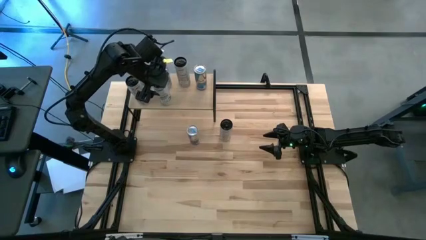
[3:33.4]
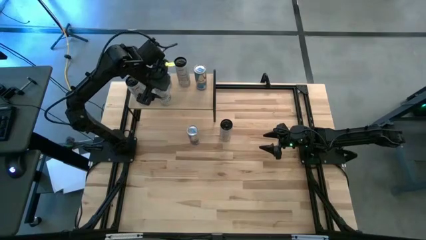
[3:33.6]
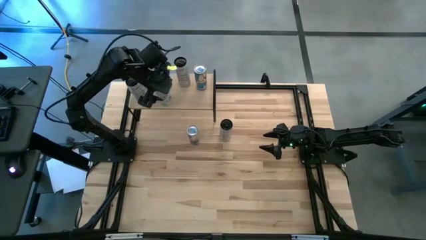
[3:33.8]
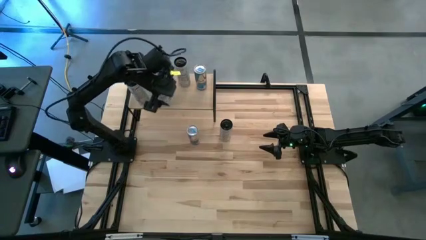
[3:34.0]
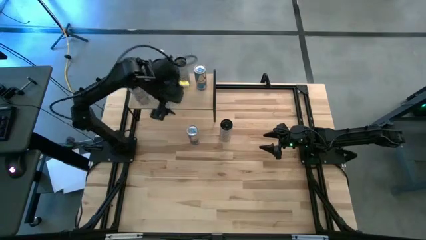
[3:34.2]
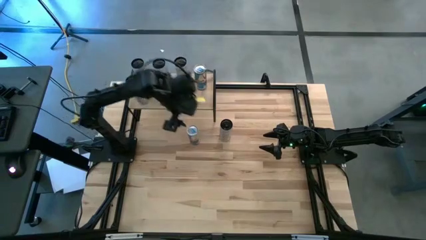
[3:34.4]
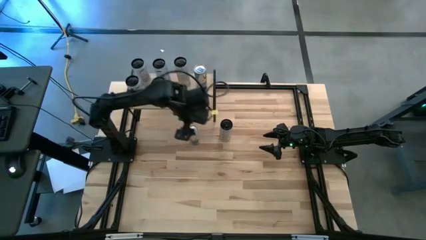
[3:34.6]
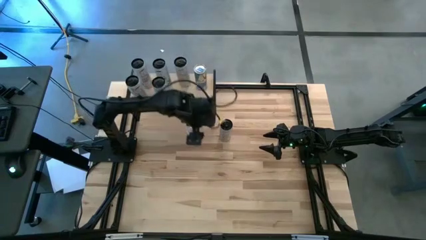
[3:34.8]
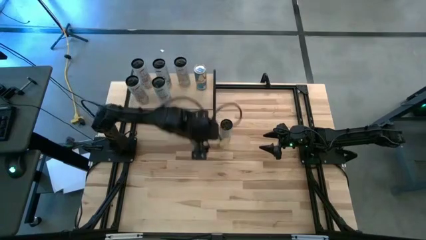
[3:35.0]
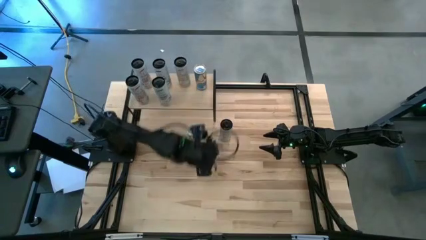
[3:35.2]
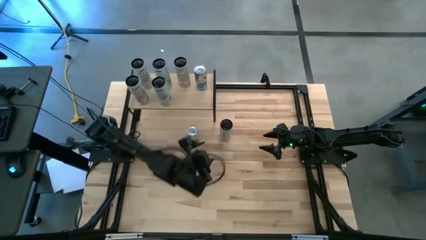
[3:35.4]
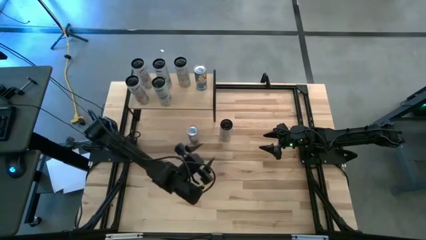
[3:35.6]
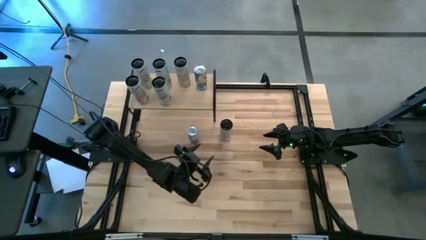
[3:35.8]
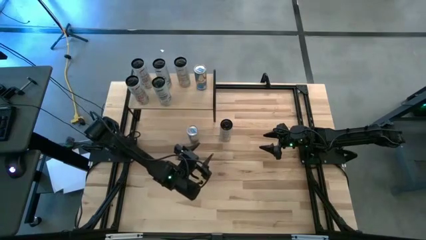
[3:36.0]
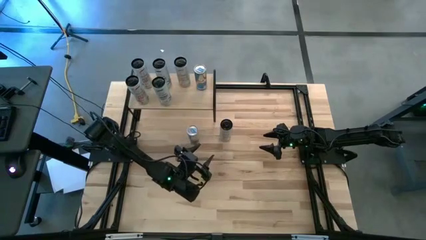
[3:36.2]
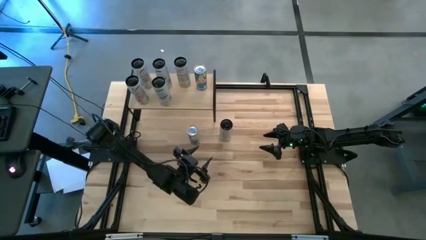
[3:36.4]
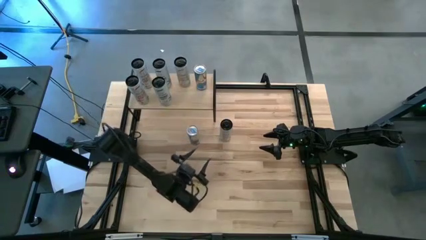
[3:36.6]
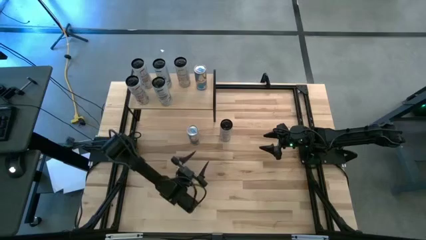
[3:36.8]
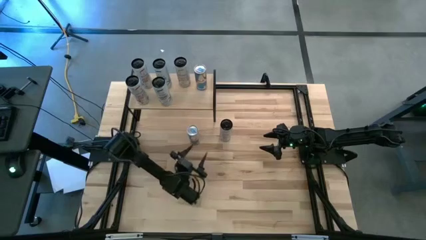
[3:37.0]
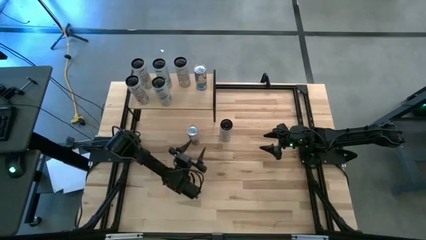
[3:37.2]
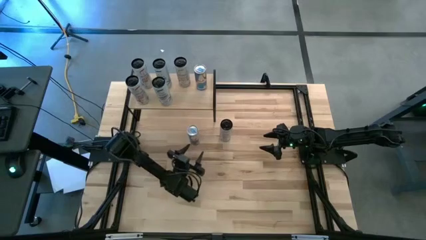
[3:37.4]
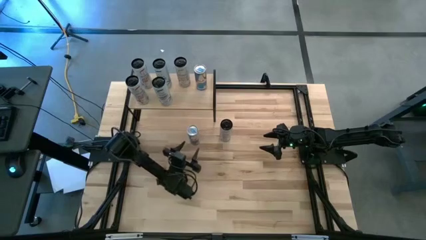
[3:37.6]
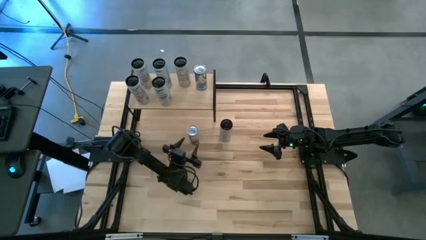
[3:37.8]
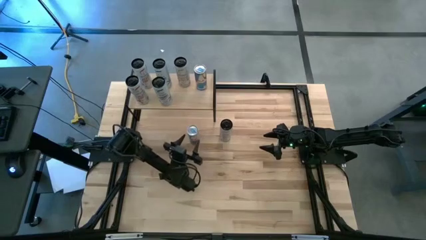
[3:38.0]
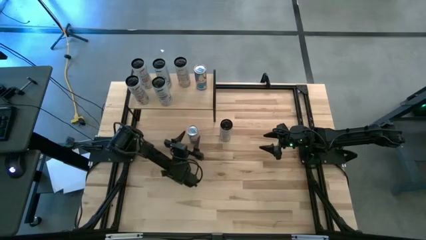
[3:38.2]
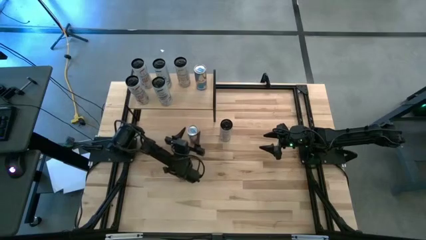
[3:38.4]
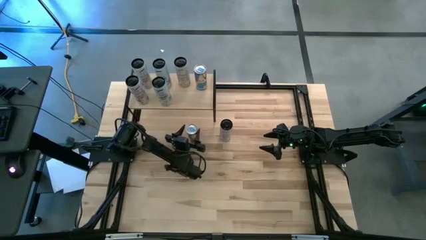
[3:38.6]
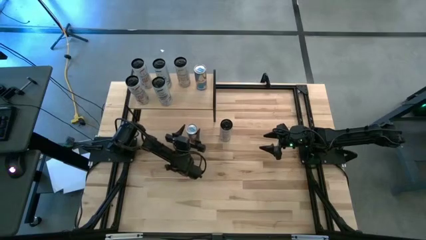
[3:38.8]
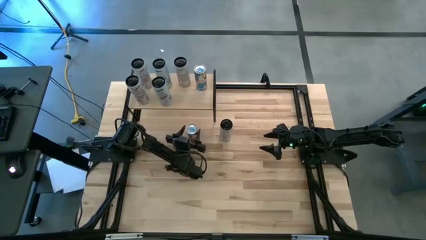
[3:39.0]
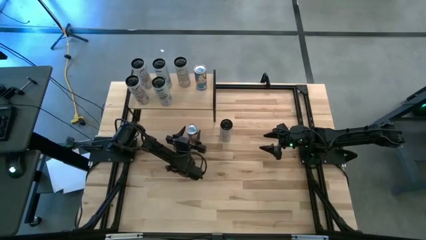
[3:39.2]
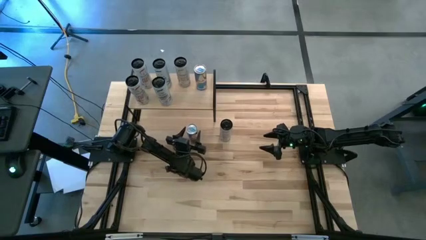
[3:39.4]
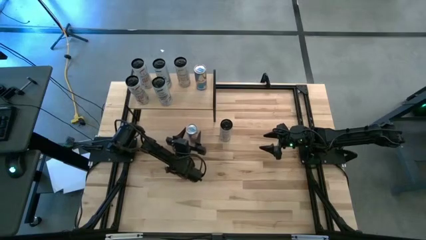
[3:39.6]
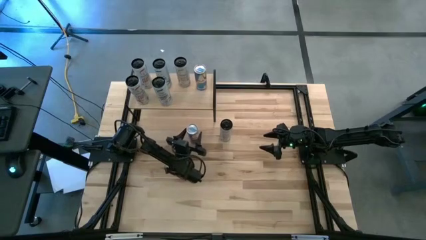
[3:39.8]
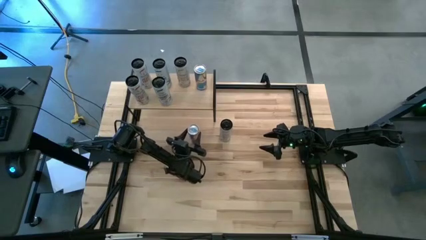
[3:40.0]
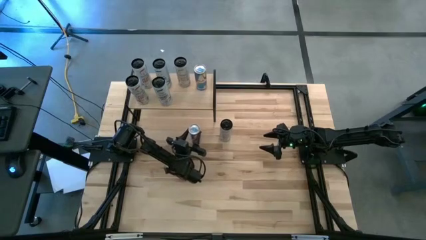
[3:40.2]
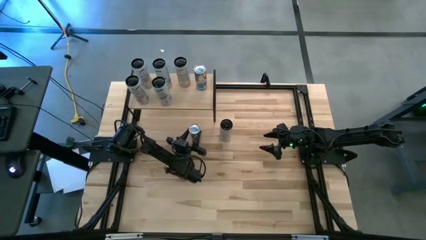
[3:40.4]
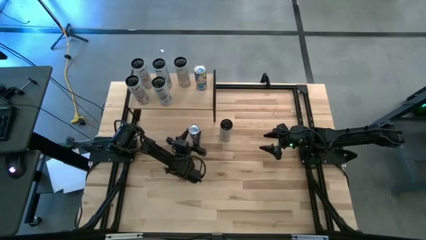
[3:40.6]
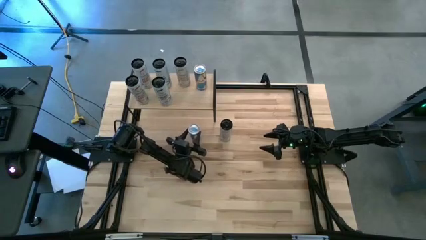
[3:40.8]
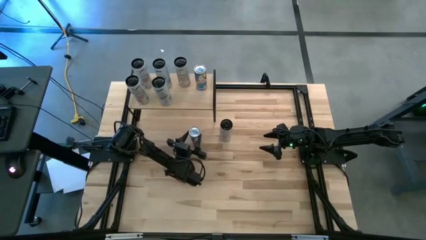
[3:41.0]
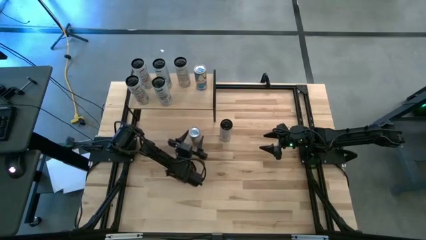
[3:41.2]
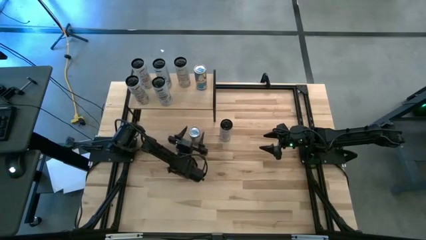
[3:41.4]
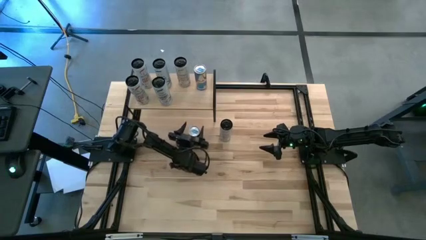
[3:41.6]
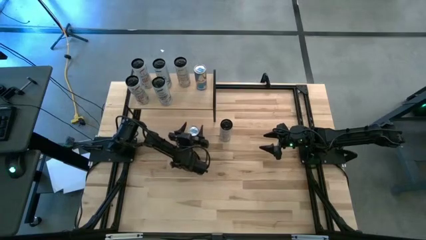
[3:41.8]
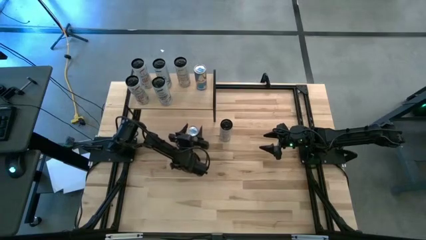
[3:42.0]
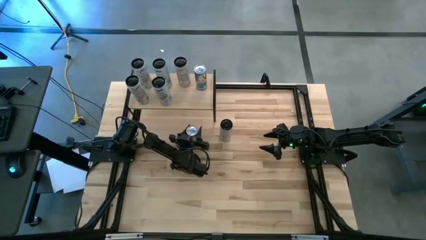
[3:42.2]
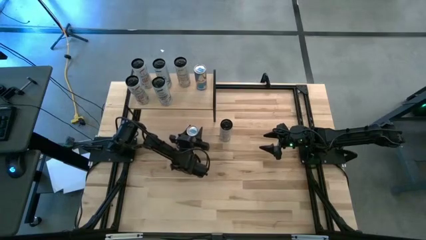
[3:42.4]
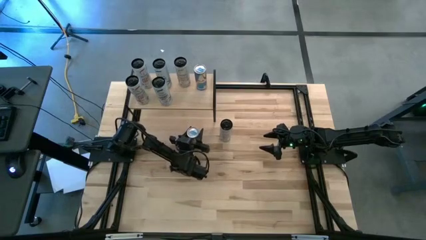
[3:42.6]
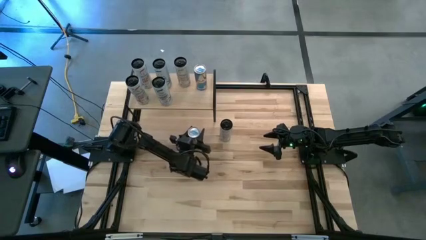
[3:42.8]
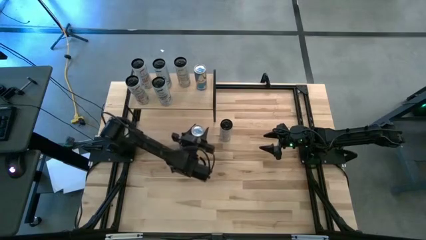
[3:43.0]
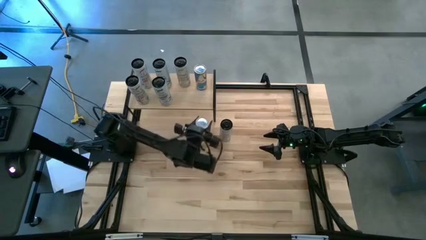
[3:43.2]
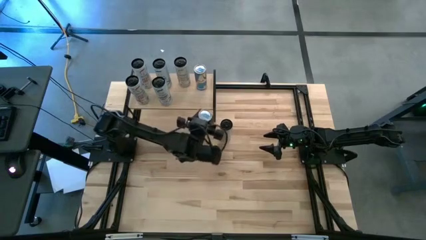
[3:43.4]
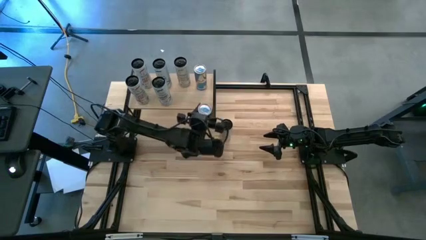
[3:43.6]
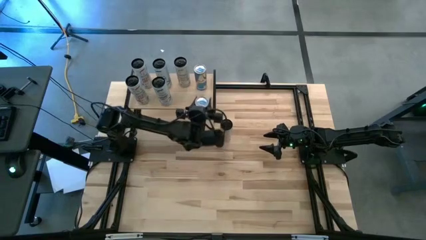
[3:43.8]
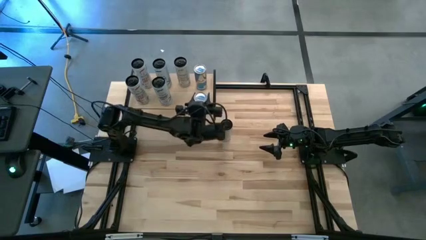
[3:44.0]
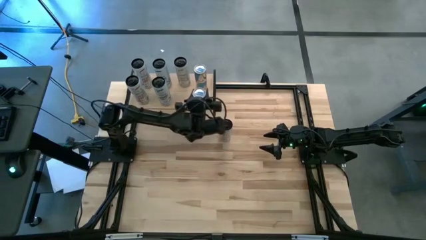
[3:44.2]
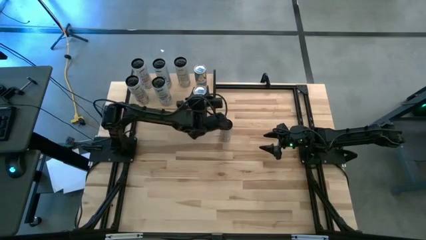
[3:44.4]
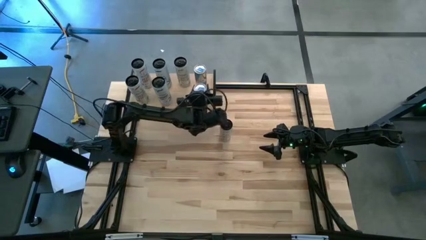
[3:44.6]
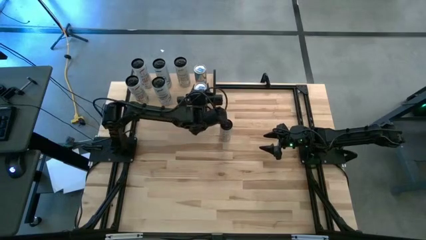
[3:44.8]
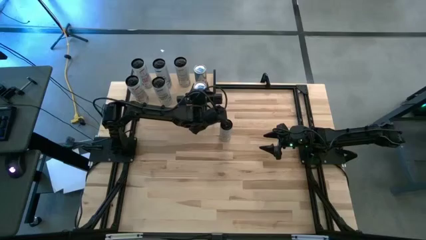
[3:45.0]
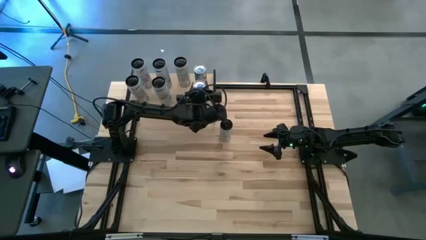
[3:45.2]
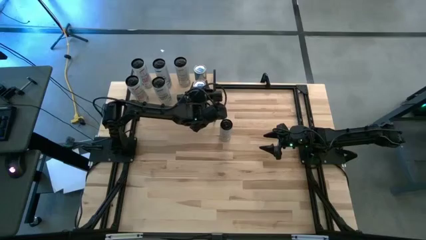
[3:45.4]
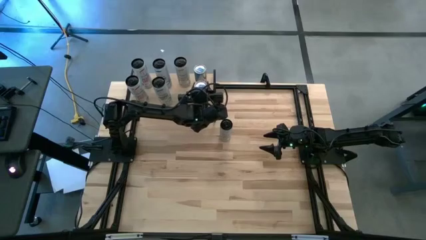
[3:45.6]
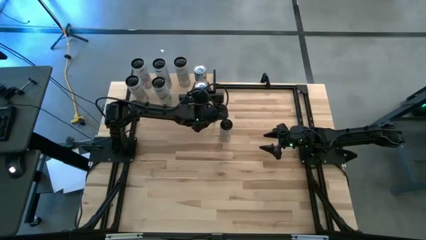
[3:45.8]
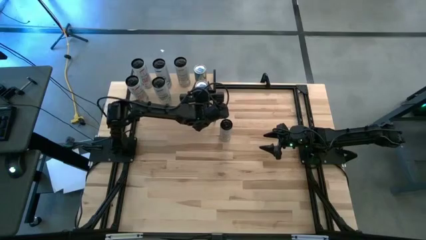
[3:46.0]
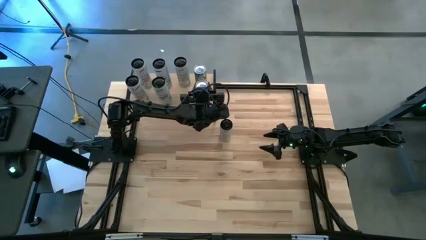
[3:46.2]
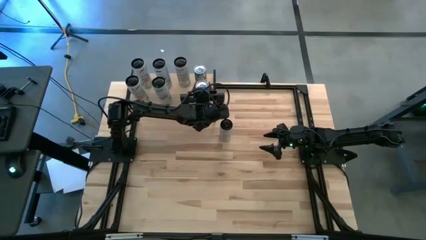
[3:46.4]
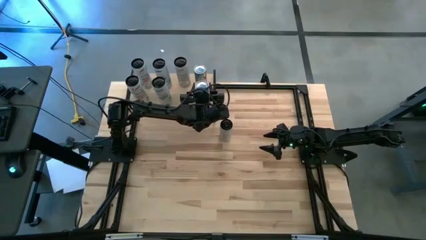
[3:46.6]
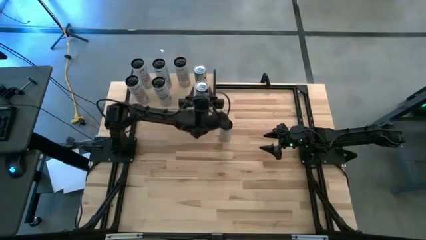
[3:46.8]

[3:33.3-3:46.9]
Task: Place canned beverage on shelf
Put the blue soda can on the shelf aligned with the other blue soda can
